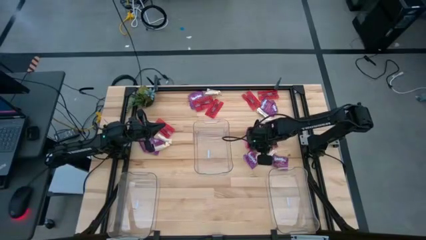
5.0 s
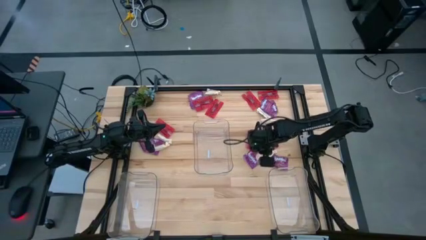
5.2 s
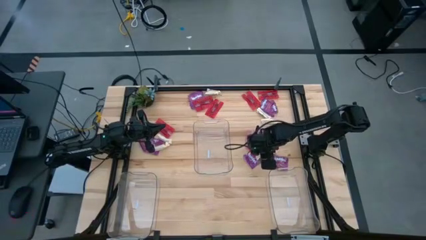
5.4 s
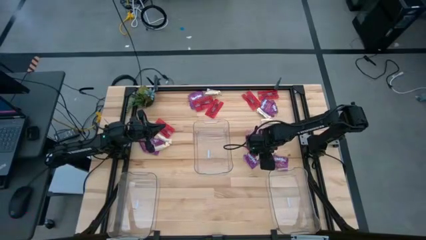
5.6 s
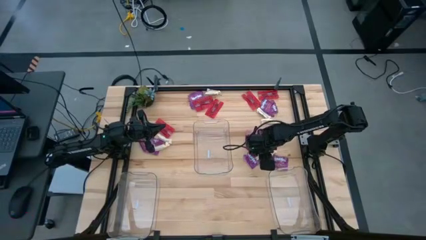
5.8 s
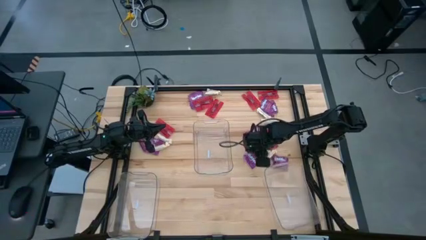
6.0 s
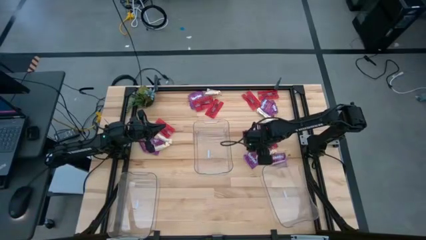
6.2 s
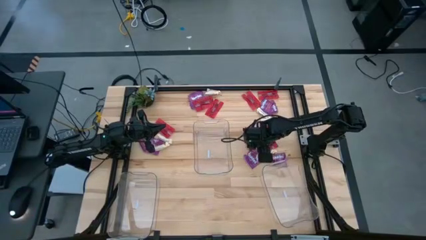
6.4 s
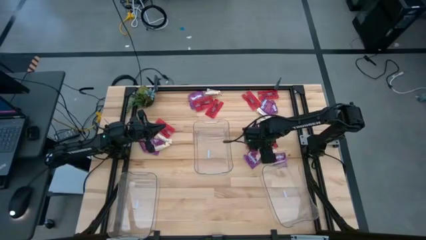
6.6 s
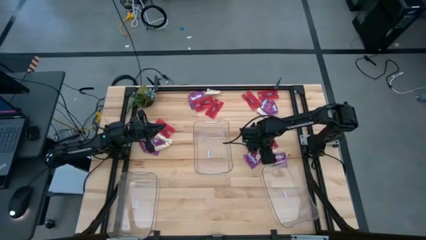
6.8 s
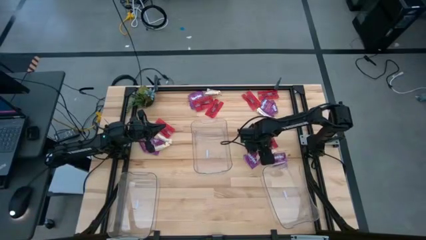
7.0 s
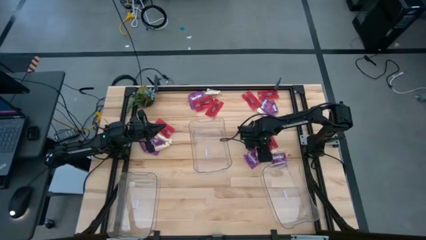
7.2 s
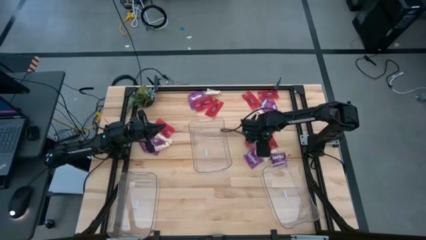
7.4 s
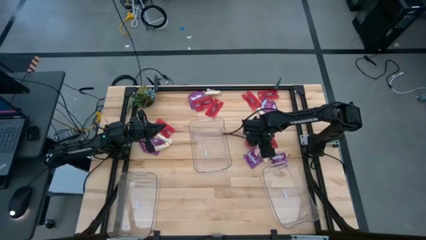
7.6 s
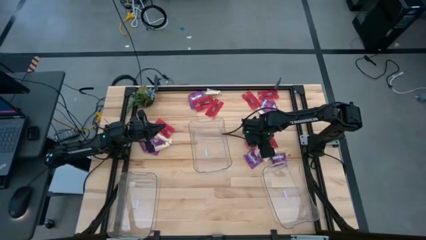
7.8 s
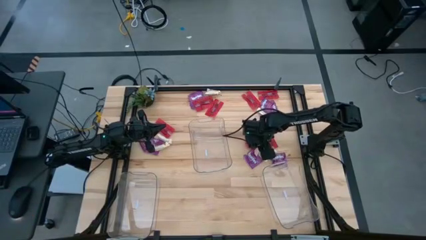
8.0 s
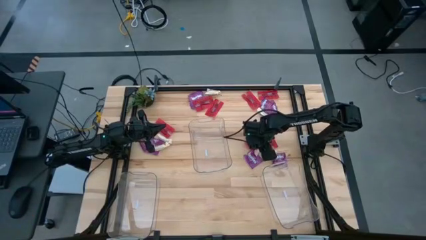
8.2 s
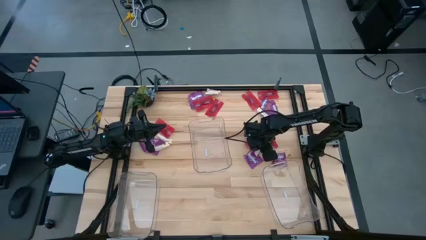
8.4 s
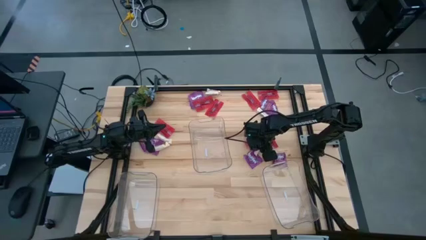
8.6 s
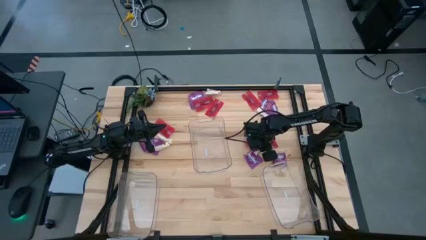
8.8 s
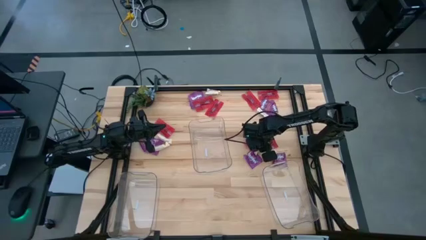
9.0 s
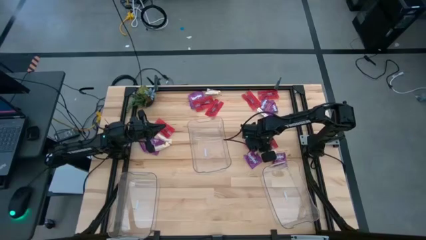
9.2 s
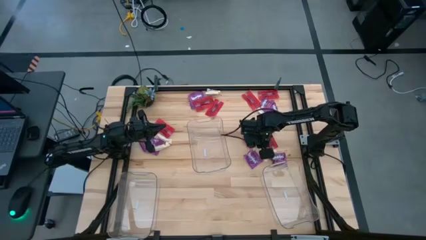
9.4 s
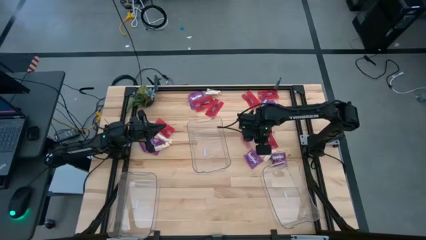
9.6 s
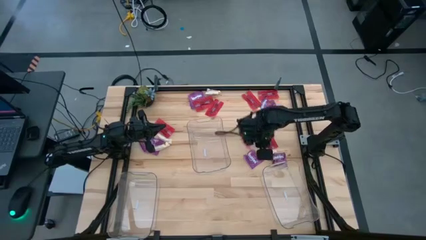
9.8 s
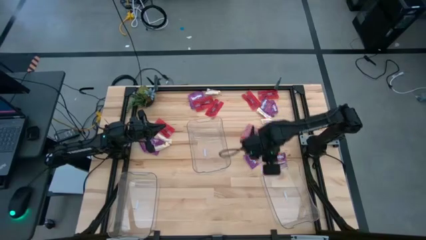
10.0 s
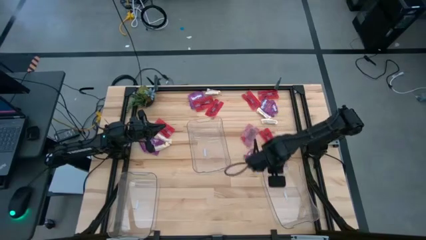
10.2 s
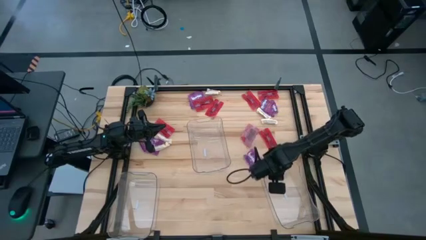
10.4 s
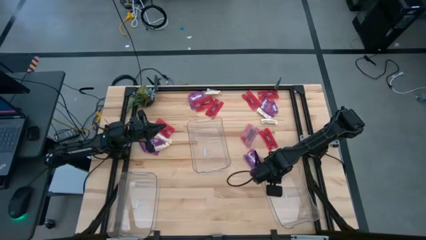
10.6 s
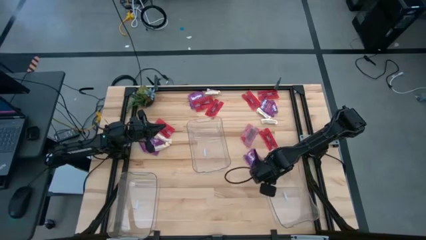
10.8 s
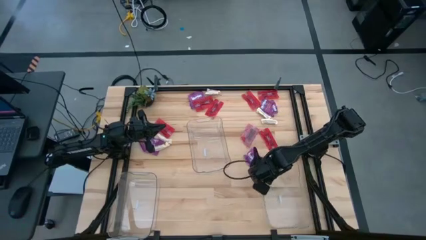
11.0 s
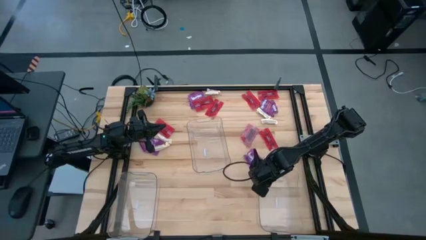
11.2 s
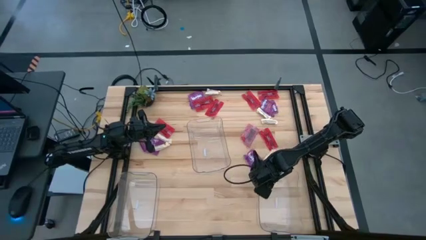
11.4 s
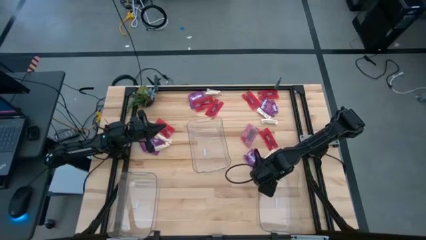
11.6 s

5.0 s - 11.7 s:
Task: Sort candy
Put the white chocolate bar into the right transparent bin

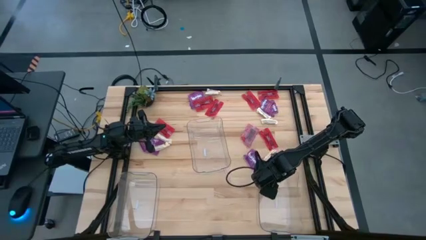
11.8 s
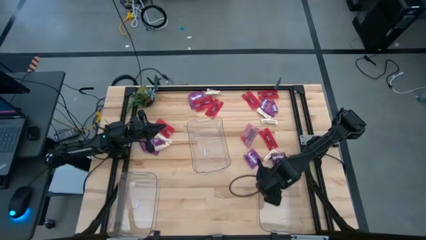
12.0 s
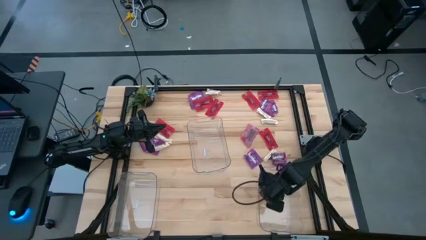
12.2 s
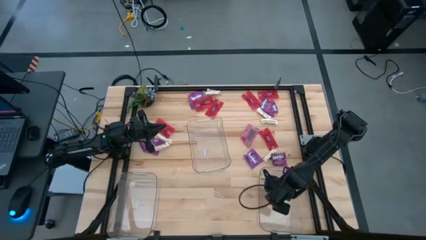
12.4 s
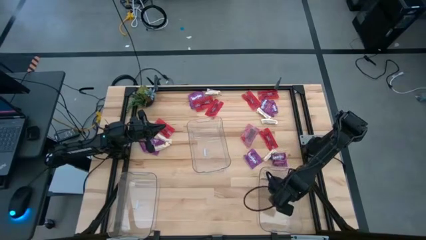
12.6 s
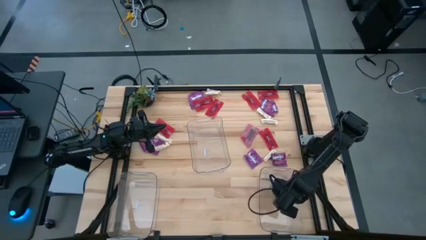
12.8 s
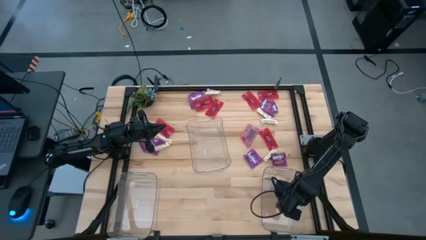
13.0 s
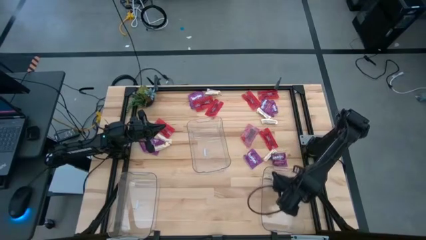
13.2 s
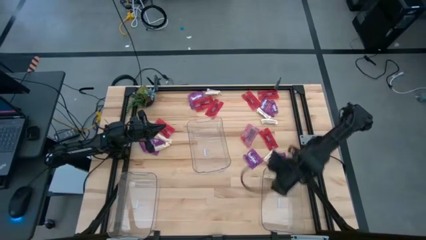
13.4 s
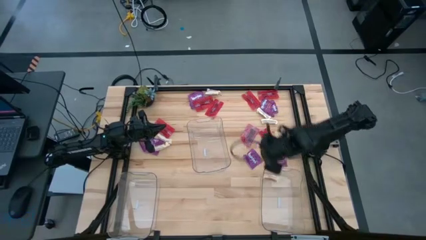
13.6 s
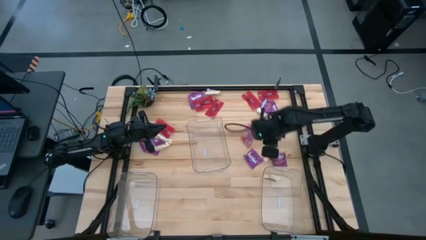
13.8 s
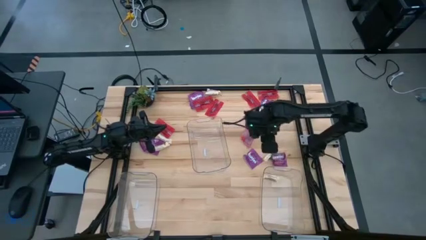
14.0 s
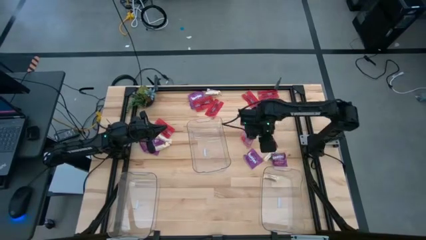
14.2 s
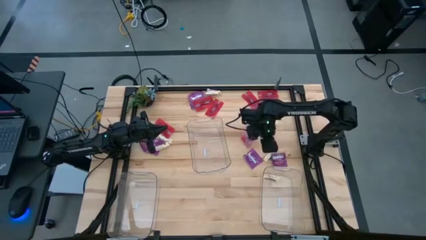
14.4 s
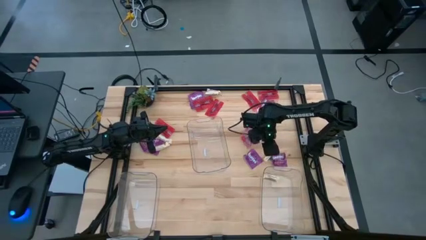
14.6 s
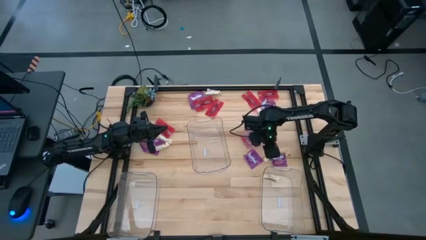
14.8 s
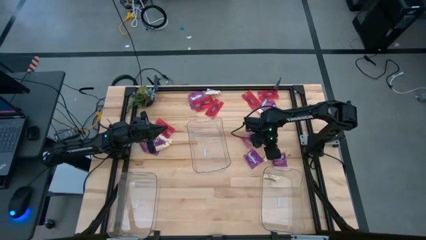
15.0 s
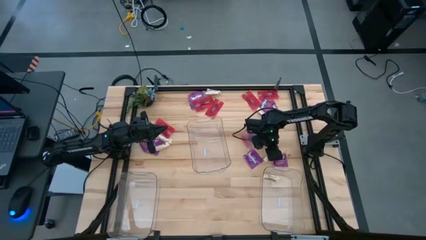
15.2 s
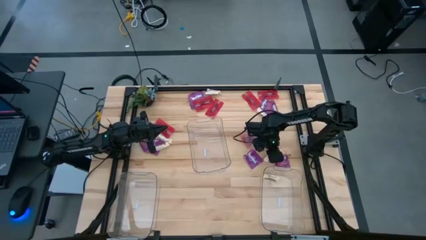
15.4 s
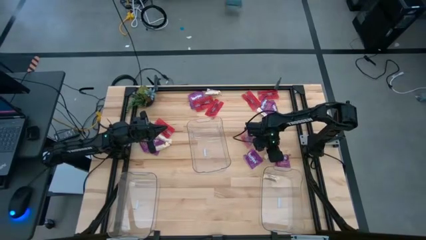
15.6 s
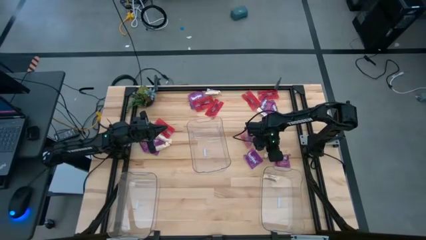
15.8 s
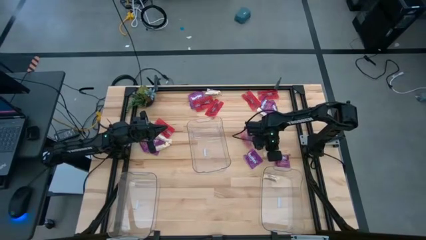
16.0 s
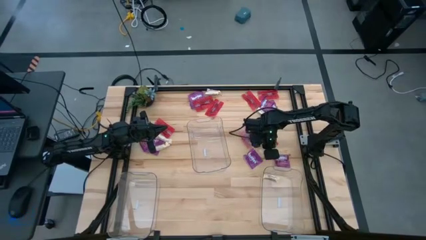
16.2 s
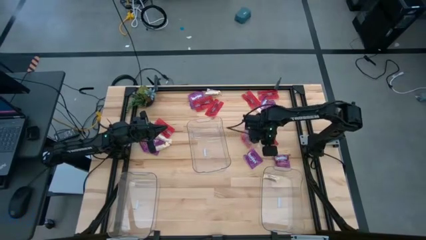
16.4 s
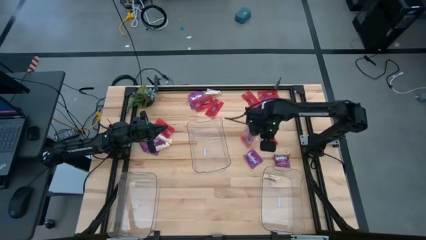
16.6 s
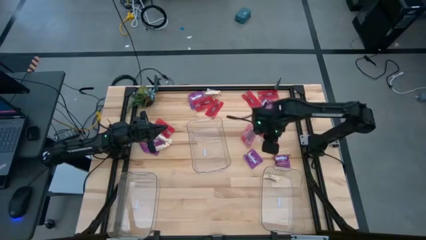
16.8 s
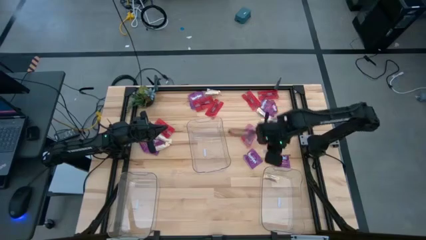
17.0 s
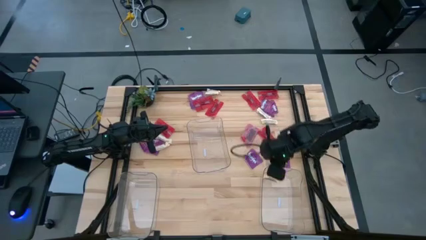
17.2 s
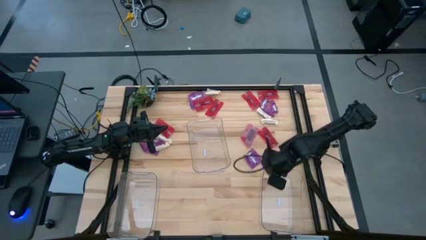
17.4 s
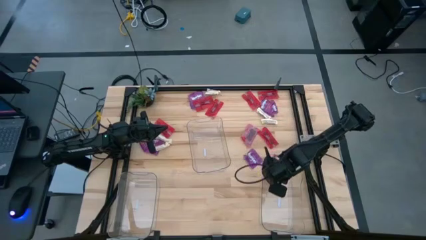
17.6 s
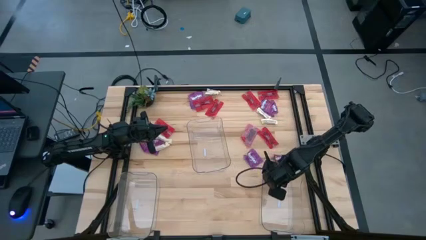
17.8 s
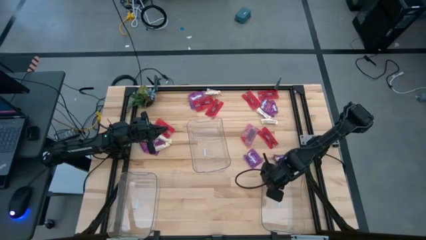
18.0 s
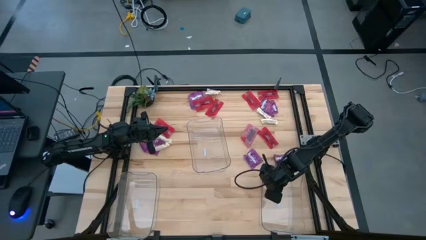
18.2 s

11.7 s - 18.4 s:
Put the white chocolate bar into the right transparent bin

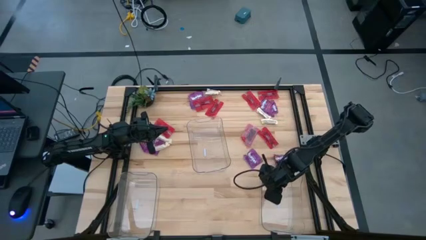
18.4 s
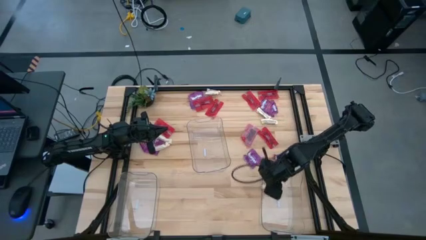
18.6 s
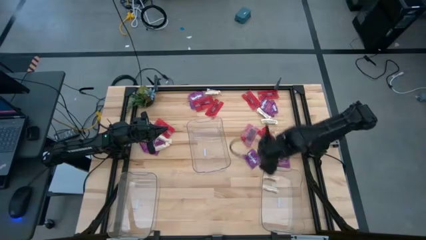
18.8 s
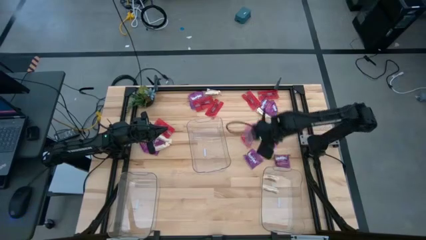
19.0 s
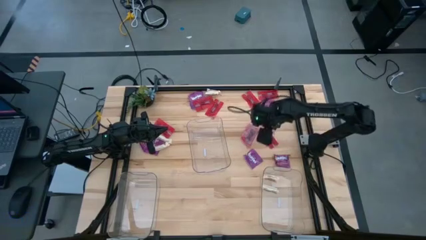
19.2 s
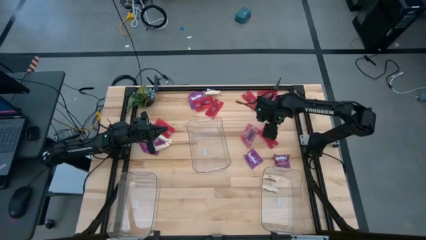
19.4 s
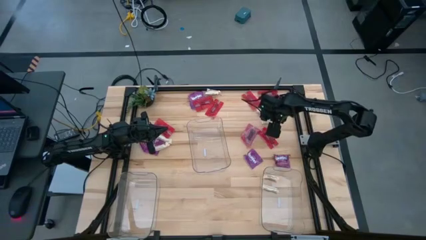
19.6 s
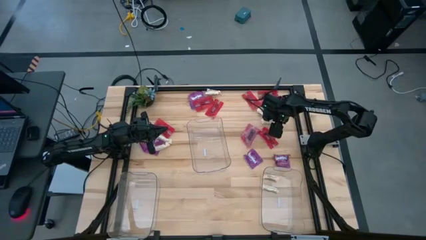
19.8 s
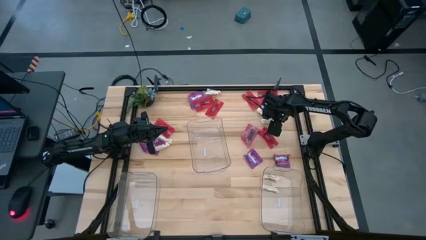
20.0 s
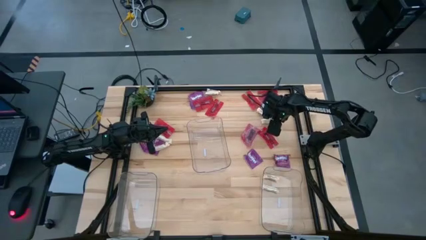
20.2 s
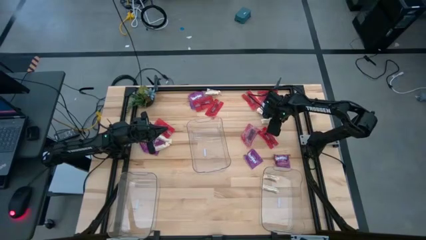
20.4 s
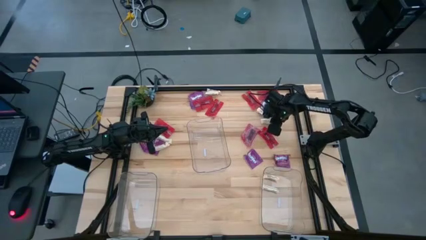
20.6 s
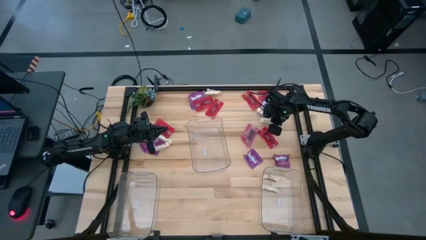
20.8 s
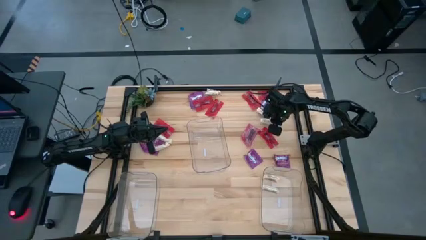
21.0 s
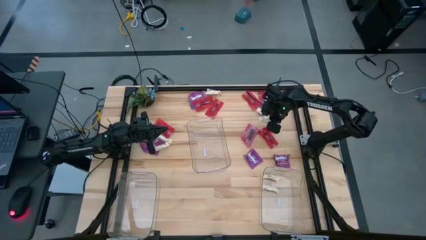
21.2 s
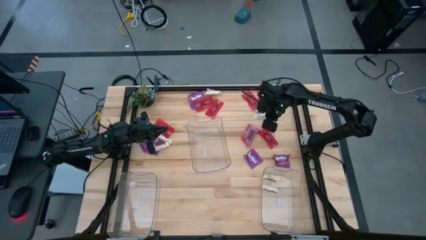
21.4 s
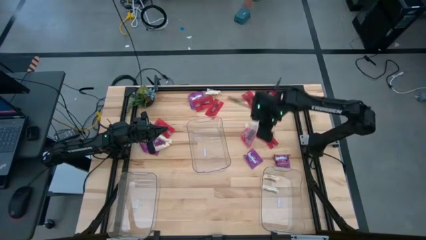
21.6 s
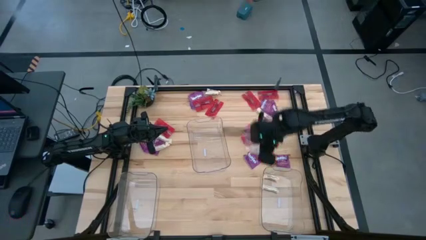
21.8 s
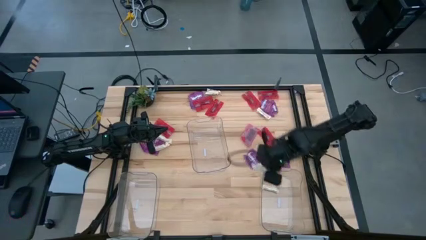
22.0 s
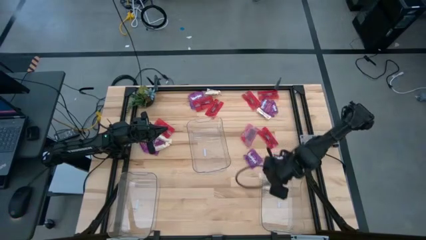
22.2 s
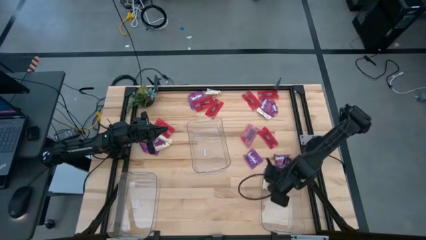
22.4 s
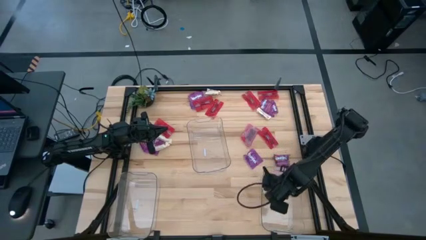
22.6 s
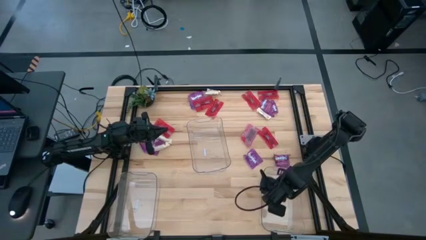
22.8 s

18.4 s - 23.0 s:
Put the white chocolate bar into the right transparent bin
